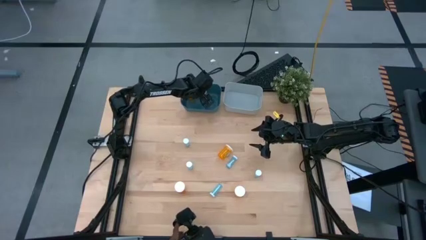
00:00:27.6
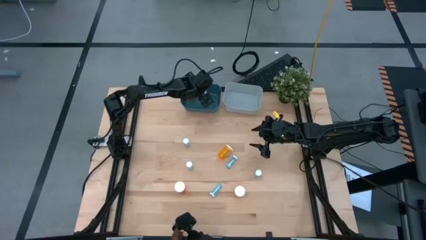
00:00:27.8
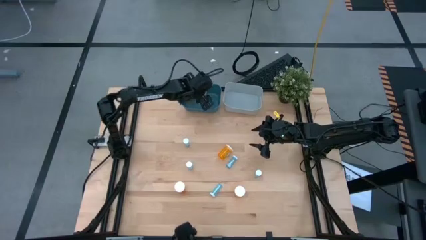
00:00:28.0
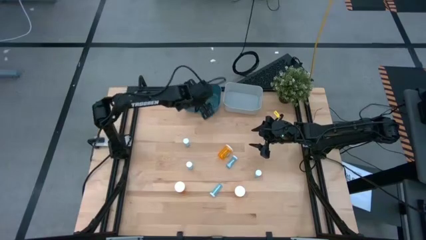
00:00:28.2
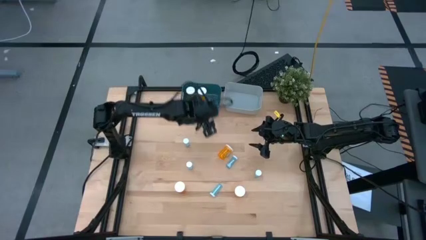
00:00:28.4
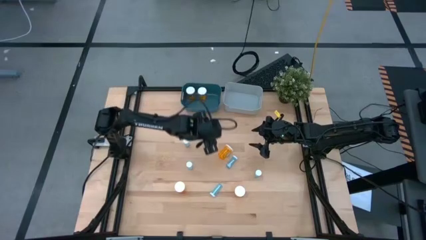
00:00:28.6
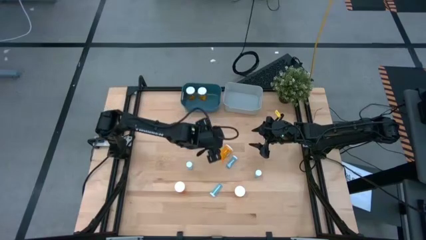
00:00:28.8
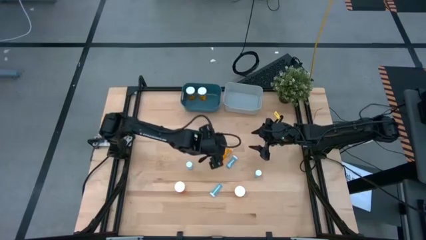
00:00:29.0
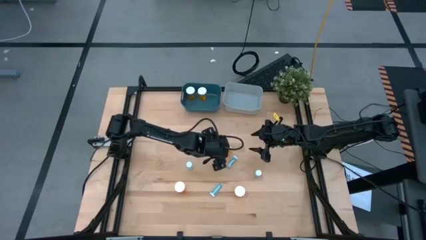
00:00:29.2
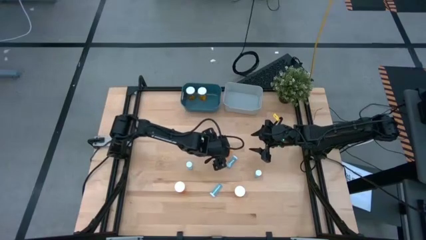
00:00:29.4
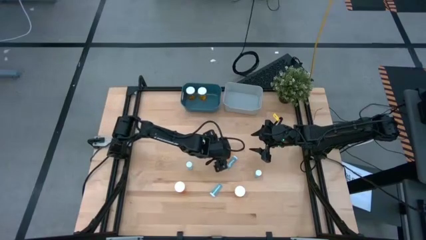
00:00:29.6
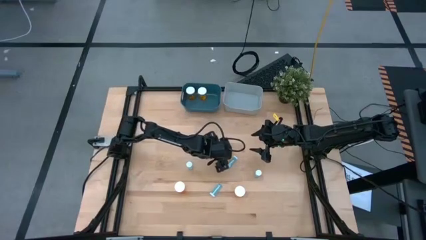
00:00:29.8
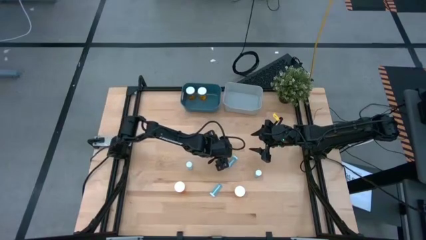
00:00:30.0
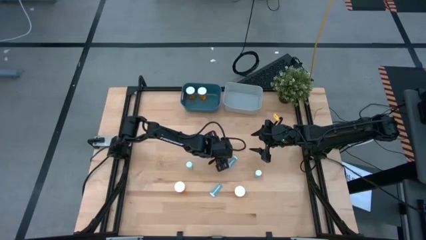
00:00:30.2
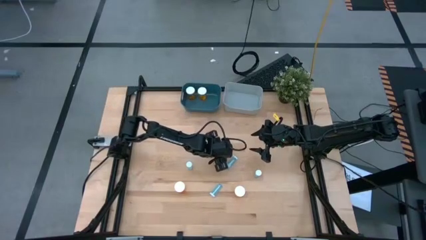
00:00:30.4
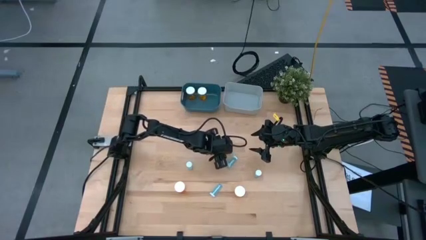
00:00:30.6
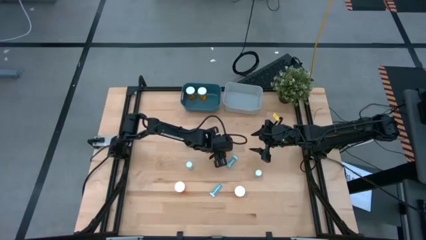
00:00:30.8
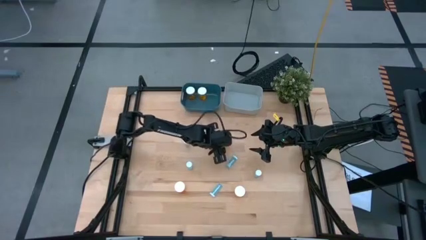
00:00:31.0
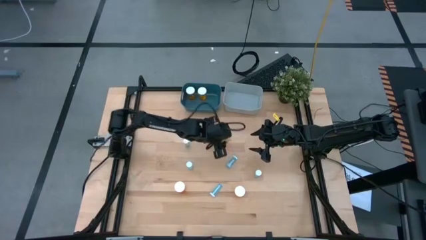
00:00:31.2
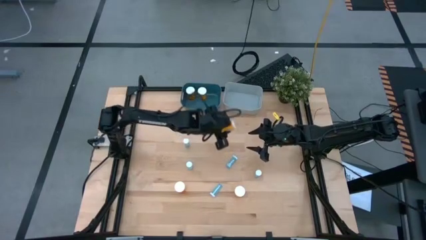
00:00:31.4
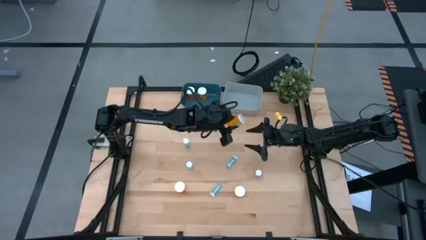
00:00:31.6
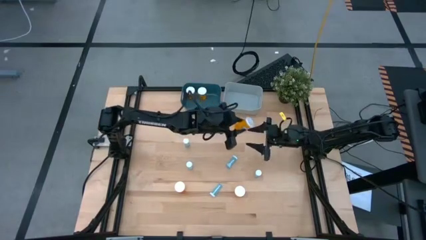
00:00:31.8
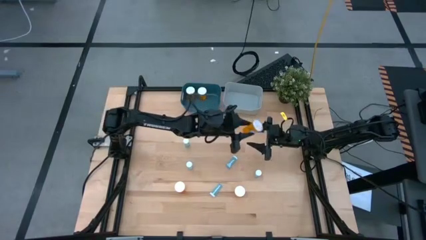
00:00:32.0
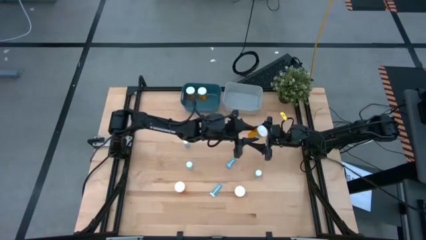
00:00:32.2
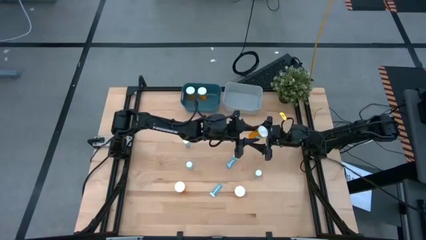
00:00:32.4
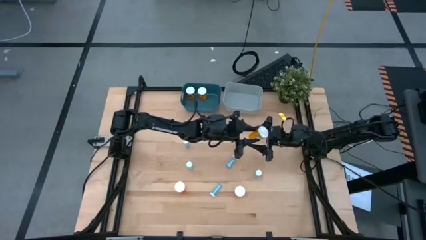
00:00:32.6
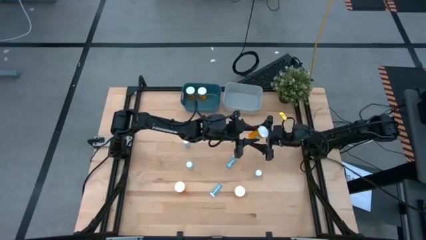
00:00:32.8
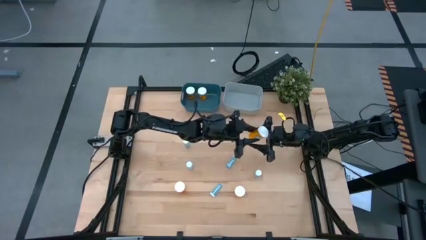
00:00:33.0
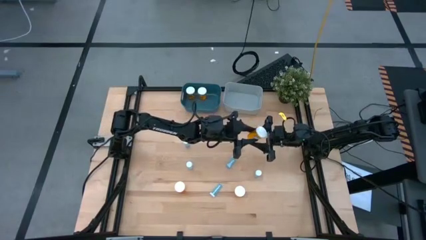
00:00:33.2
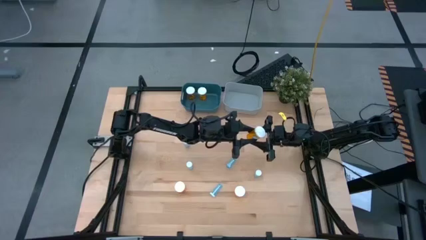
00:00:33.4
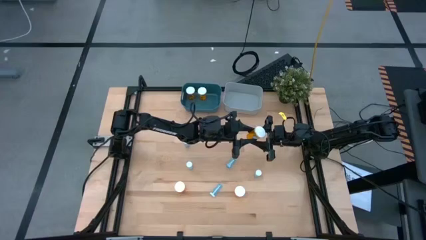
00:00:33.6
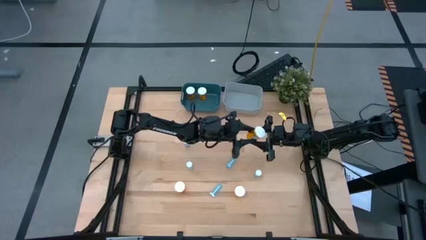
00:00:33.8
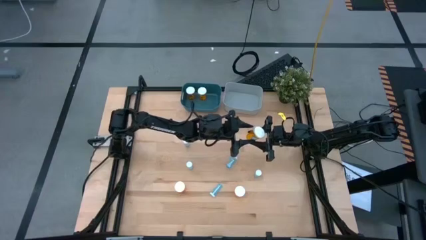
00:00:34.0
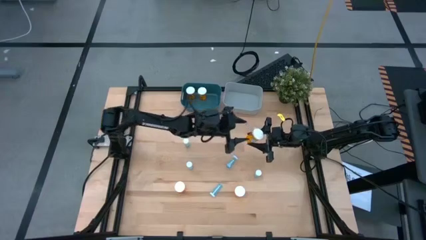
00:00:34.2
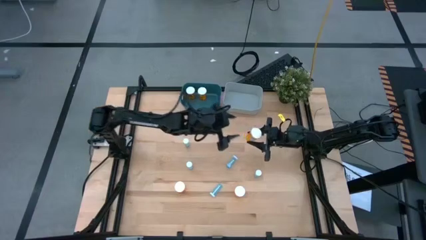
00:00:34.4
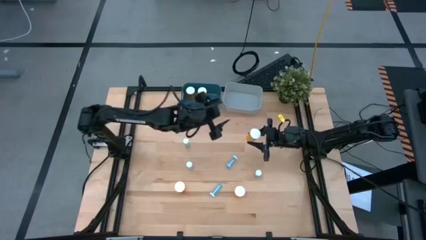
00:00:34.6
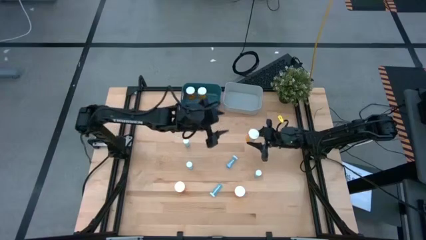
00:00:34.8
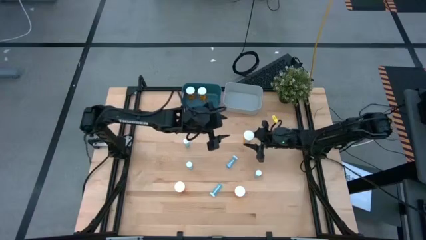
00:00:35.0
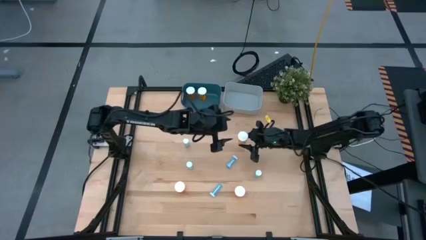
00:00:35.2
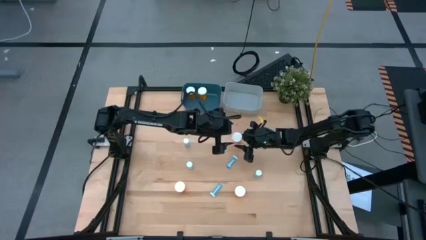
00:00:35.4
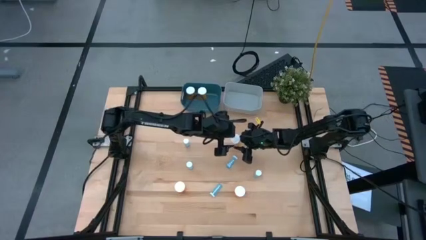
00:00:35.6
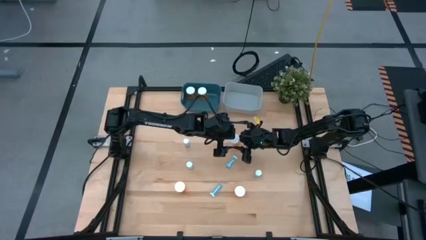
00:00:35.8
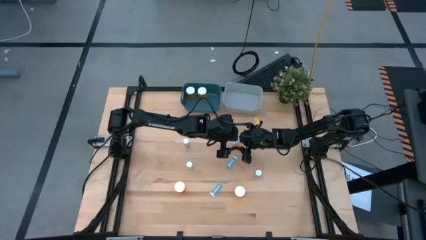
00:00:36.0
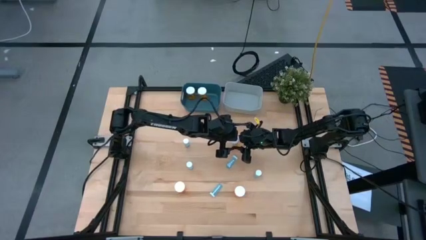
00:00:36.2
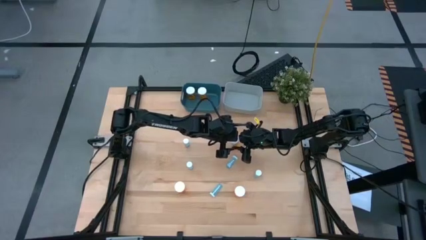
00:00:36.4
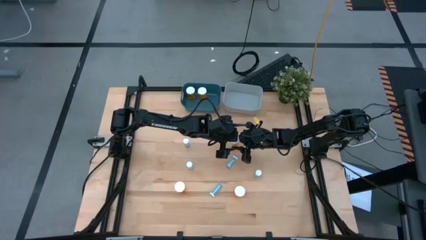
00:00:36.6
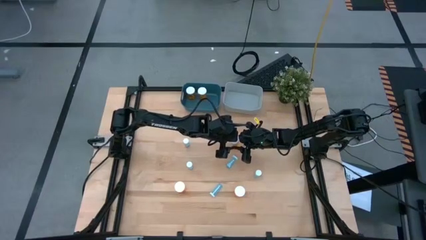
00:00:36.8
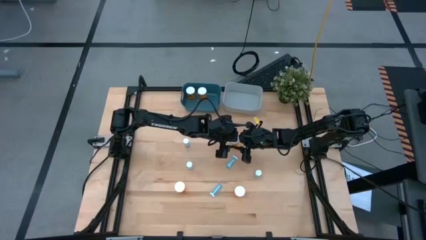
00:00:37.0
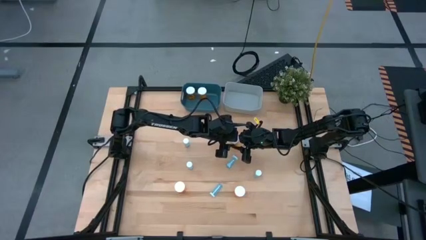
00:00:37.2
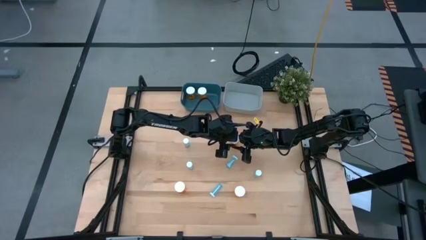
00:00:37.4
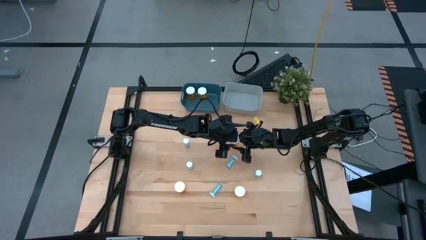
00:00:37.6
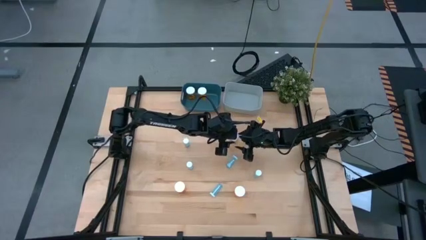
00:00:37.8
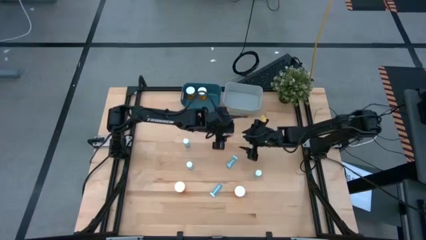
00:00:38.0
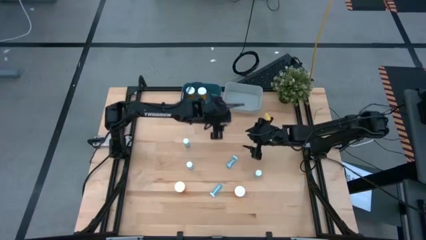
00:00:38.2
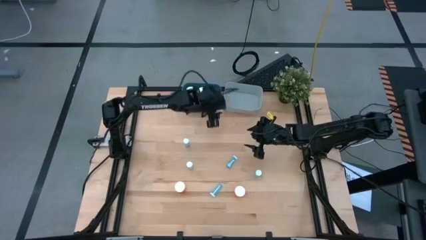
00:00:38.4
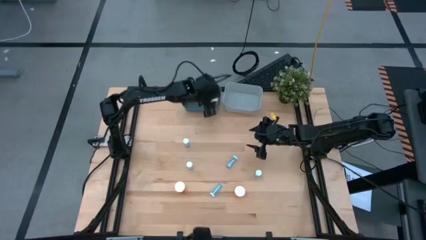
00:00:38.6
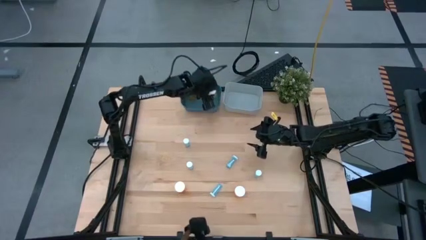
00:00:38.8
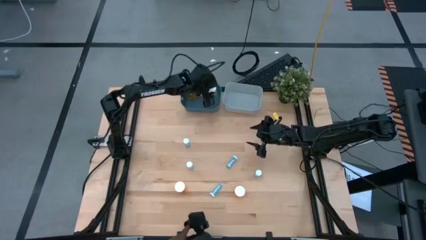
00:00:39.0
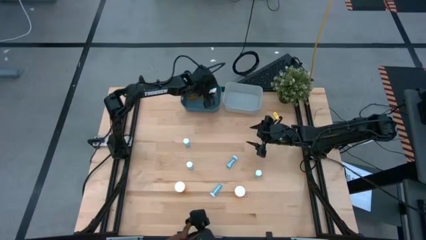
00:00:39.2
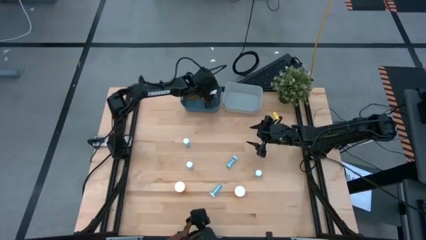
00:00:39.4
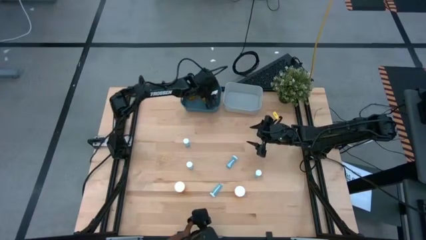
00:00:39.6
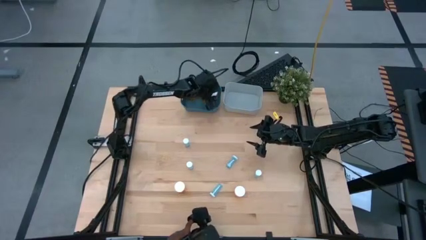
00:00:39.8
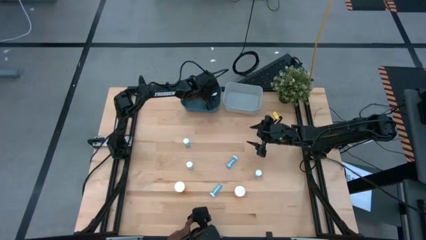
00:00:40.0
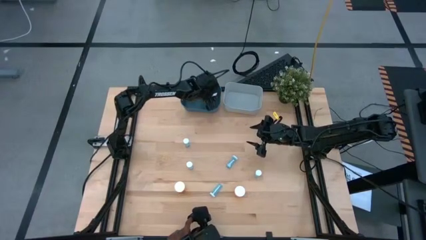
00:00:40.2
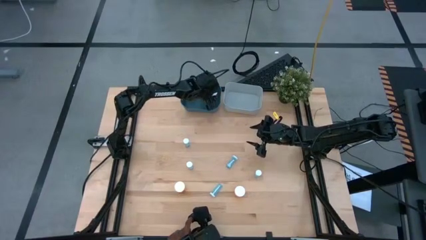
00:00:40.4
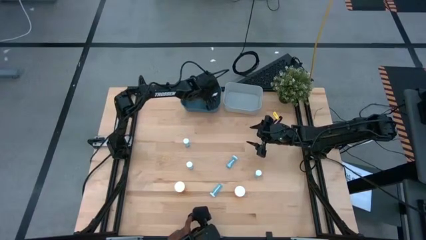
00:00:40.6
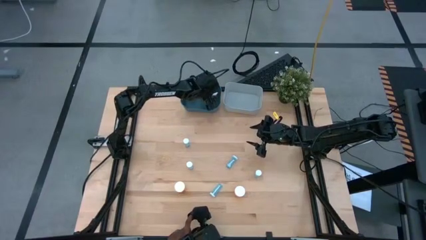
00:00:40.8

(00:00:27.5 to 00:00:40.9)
Task: Pick and place medicine bottles into bin by pill shape (circle, oval)
Put the orange pill bottle into the blue bin
